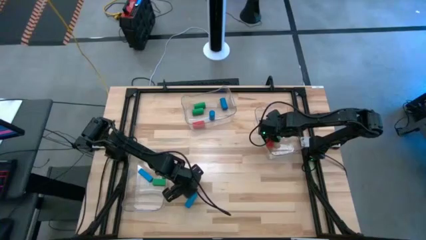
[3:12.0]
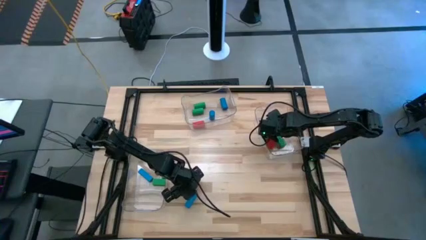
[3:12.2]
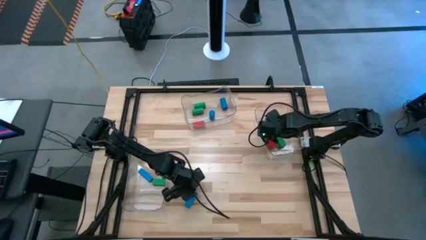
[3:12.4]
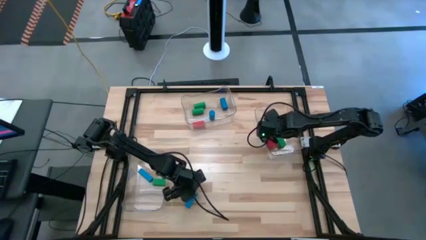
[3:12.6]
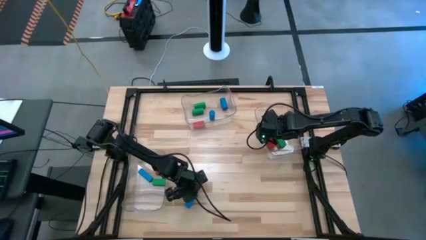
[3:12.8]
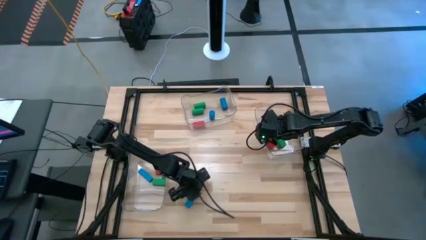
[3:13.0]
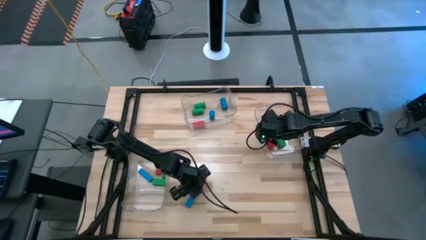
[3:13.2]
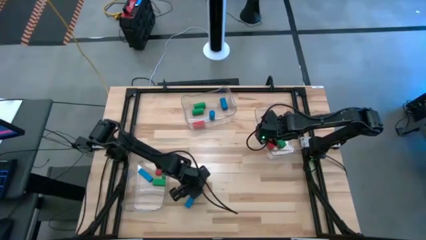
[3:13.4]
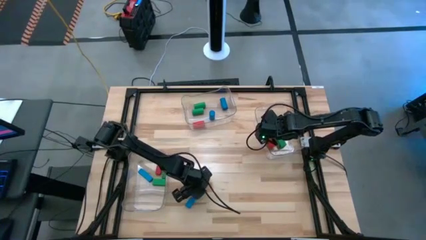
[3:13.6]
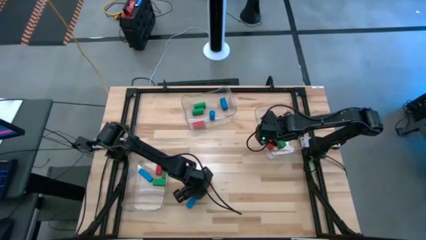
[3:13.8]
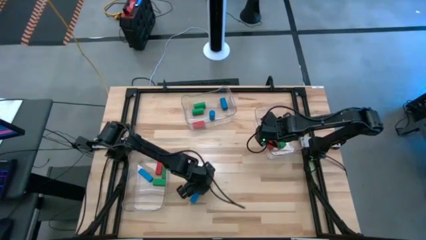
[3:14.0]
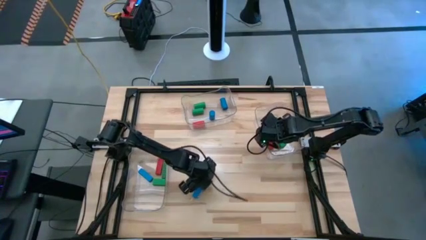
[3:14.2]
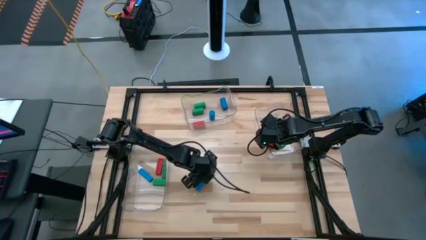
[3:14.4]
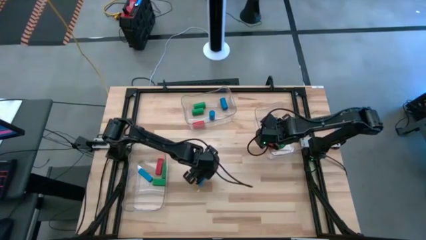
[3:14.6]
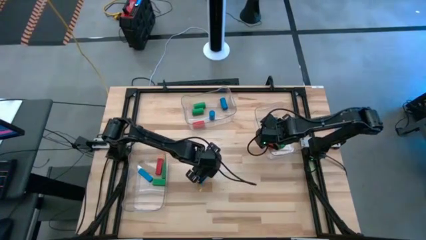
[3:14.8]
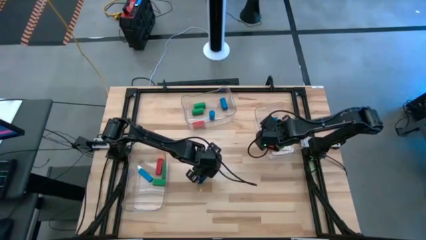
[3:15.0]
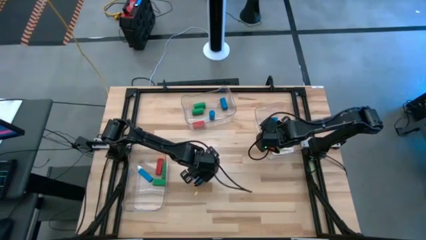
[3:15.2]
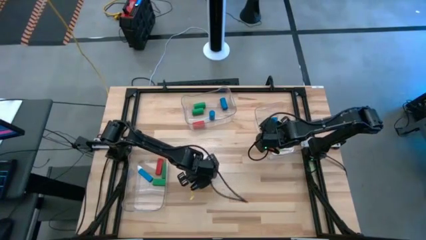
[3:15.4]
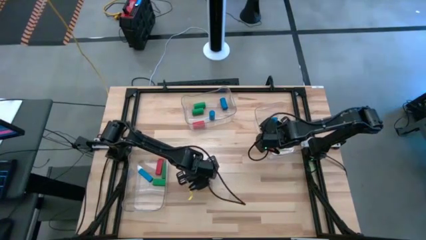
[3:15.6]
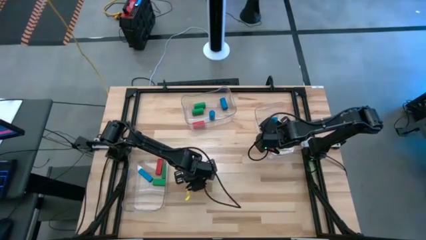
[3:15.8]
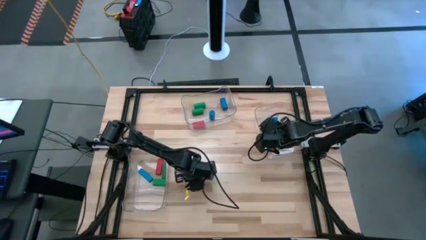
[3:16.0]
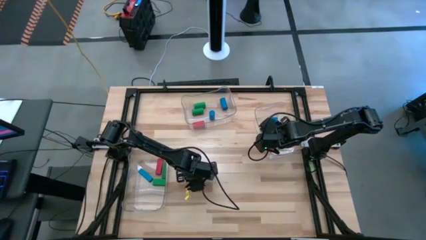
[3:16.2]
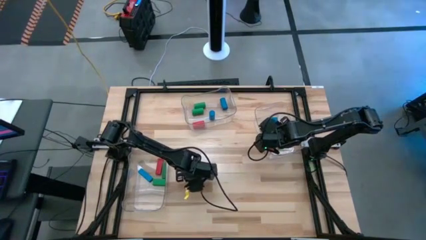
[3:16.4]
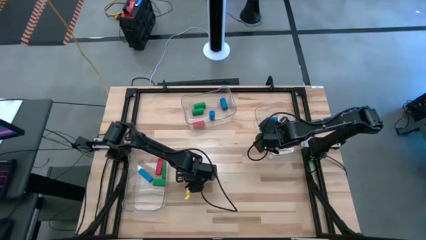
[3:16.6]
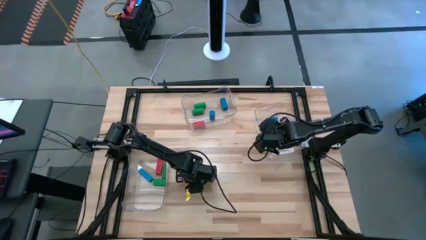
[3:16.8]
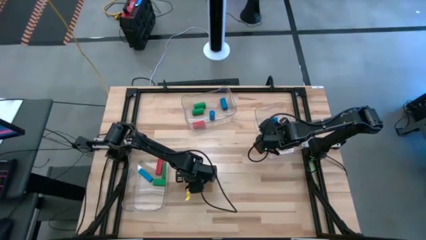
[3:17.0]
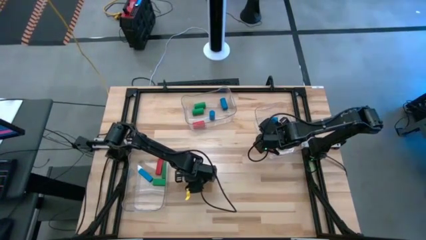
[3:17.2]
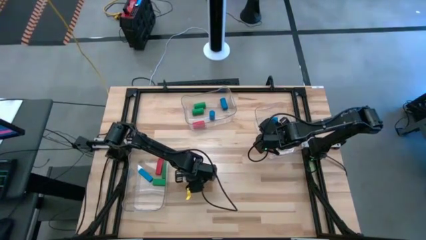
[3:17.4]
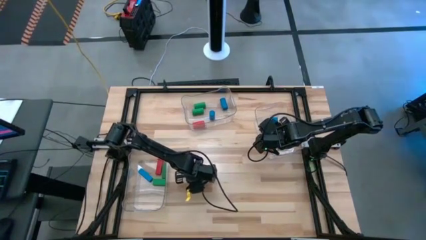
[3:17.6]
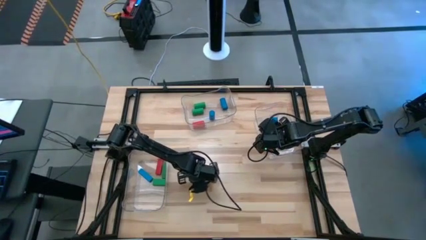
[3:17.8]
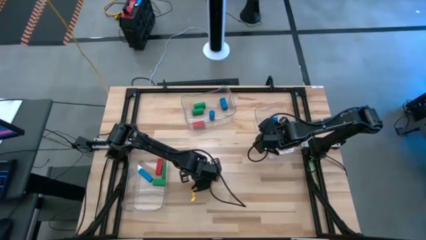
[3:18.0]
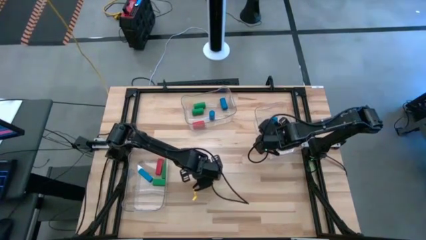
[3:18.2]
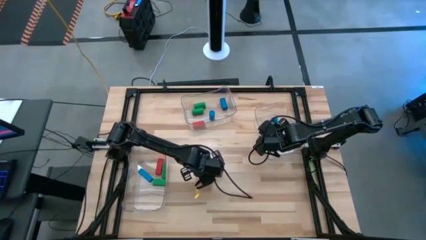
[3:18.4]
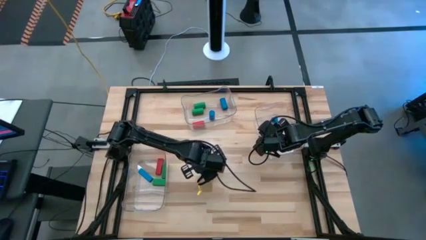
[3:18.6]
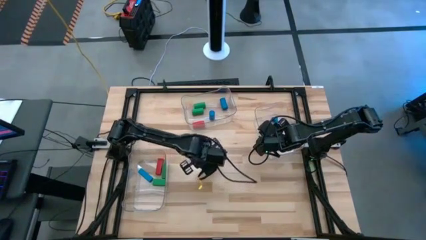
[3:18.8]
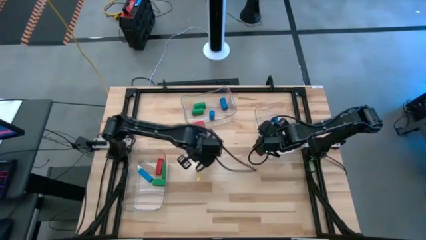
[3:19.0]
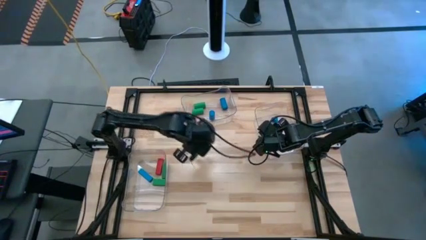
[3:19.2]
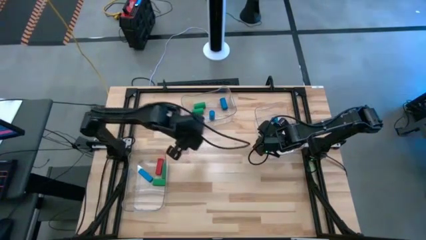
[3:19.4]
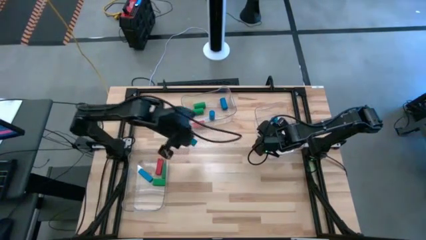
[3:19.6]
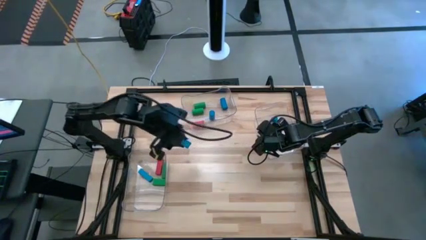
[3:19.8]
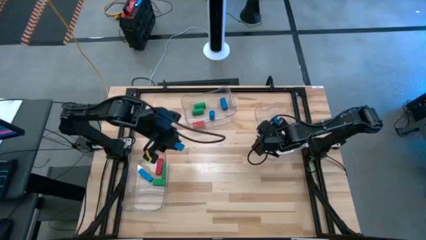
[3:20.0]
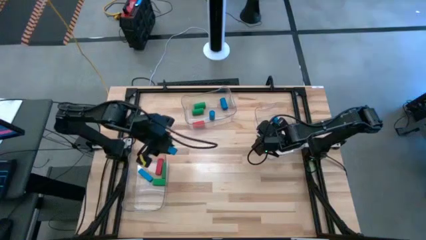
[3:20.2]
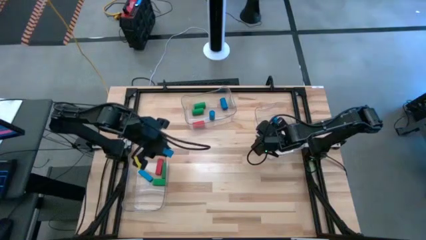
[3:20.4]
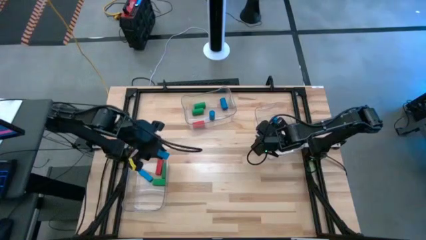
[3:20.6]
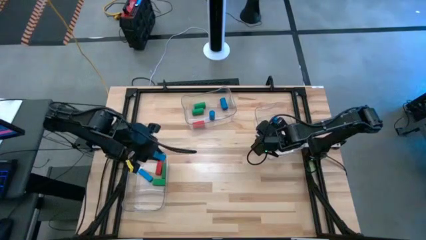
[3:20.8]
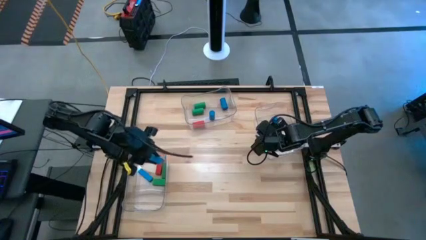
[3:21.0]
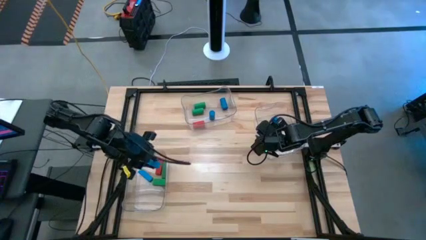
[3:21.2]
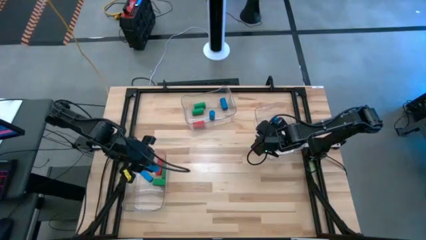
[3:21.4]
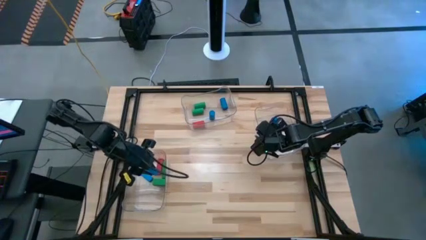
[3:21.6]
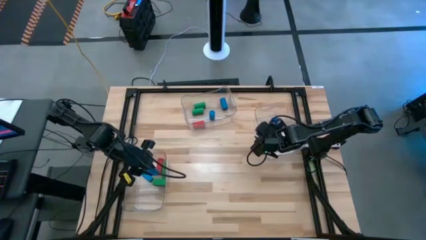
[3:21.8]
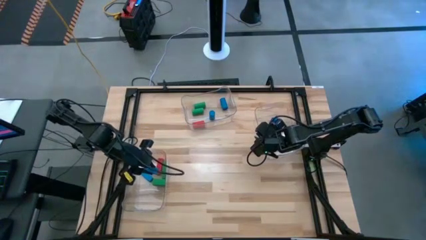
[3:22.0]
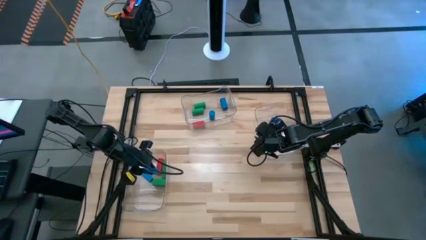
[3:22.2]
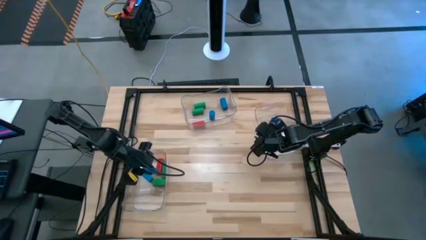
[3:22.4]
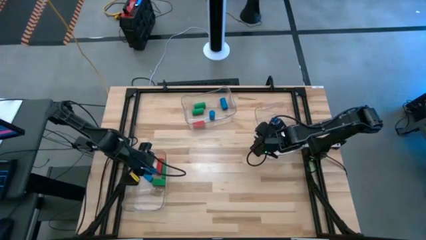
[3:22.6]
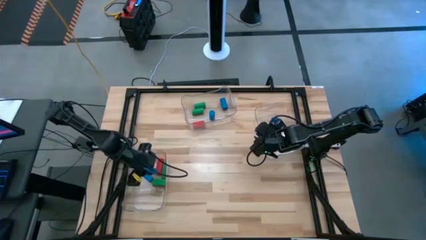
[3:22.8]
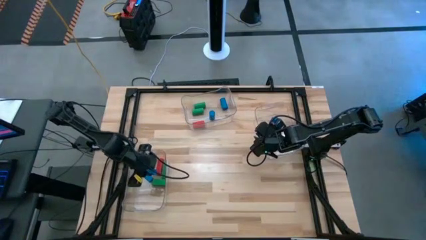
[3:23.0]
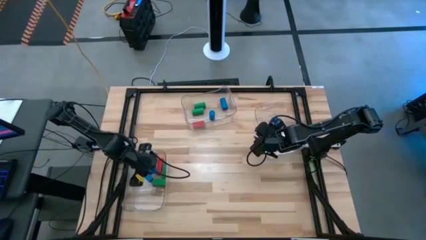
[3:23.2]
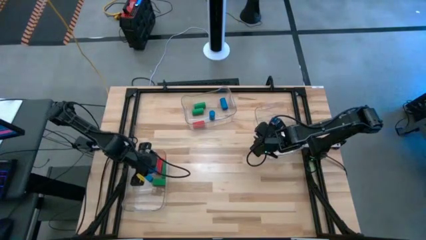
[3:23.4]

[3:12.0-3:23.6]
Task: Sort blocks by size
Put the blue rectangle block into the left transparent bin
